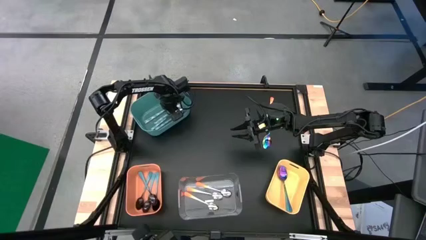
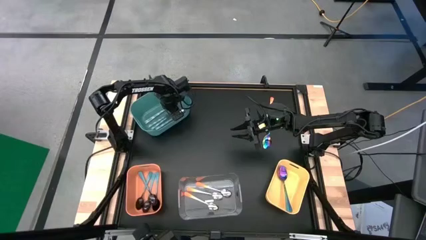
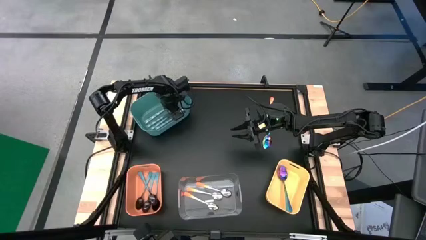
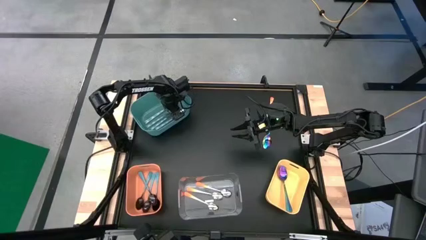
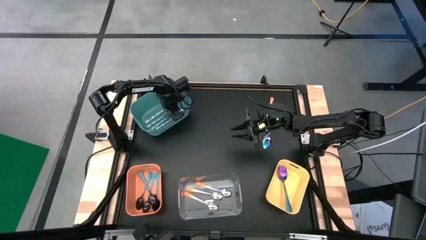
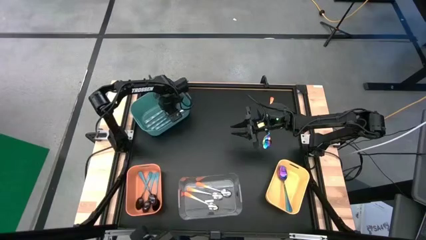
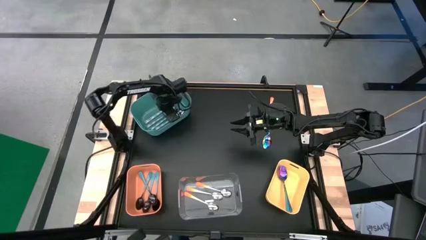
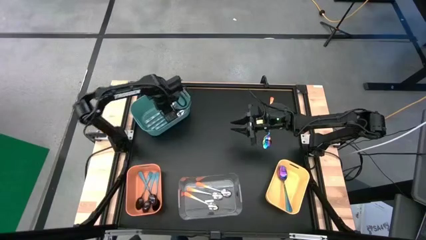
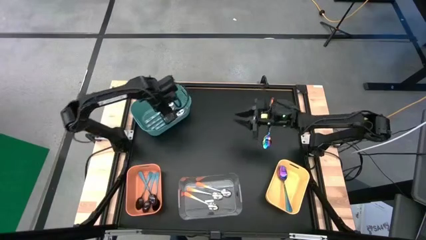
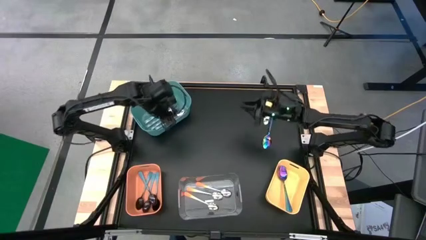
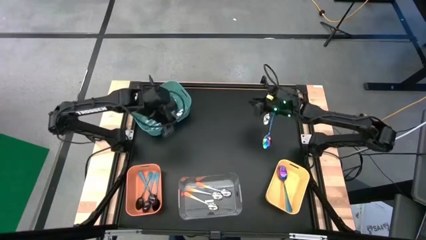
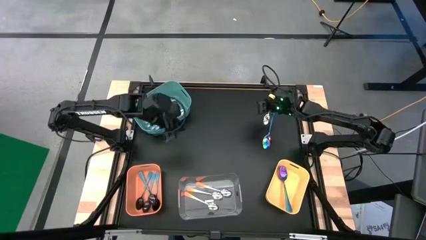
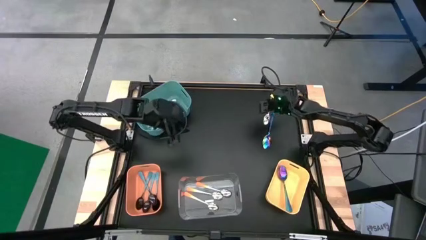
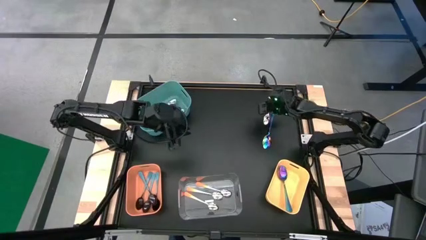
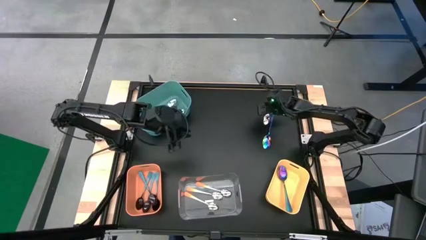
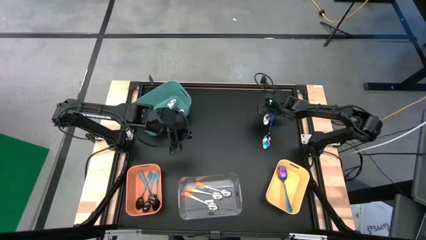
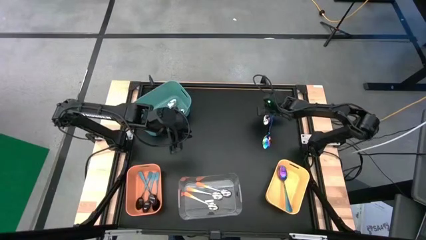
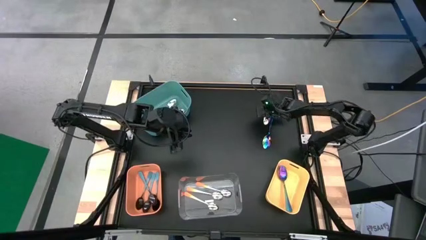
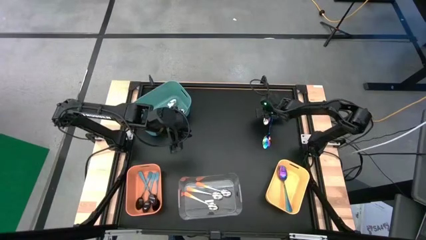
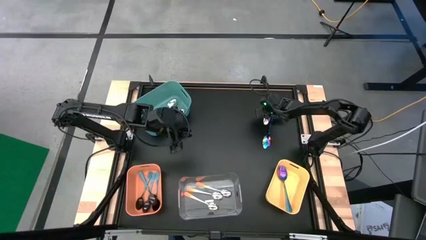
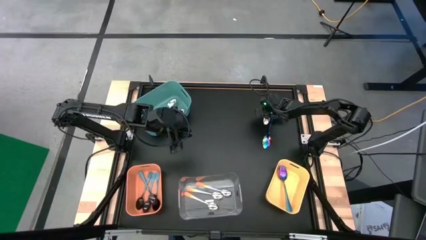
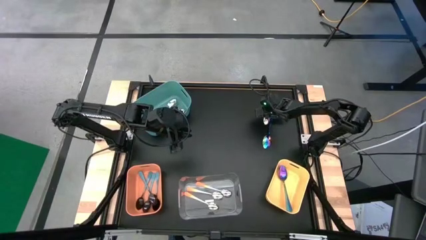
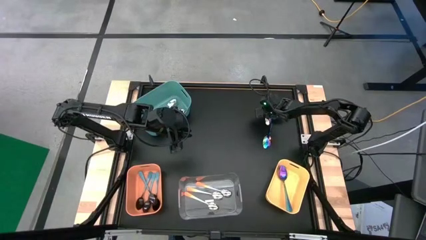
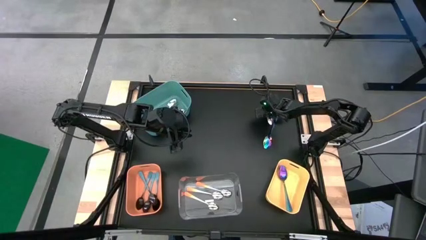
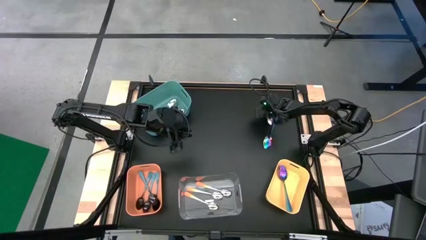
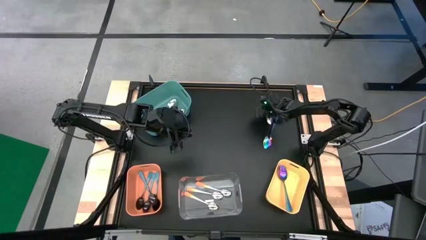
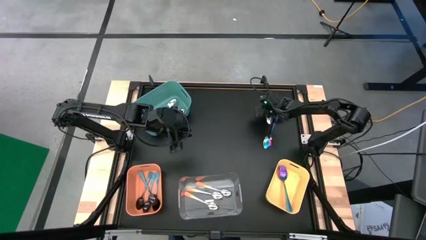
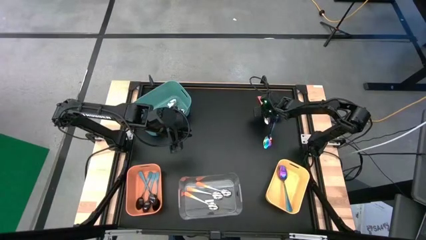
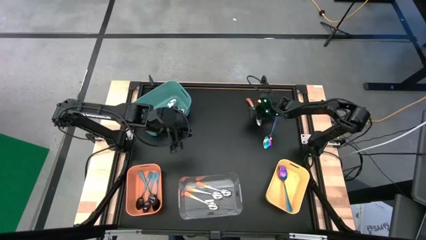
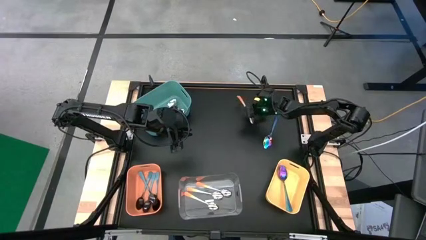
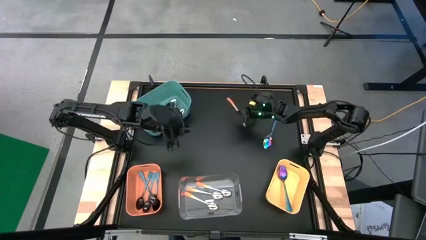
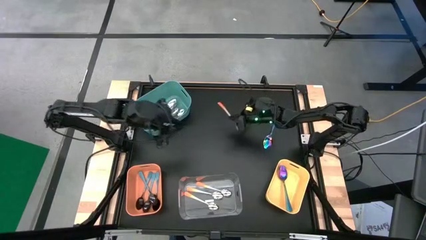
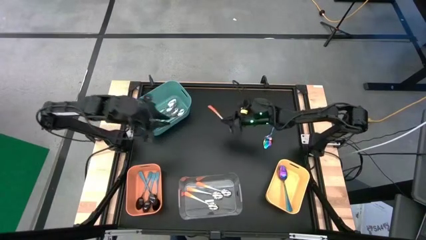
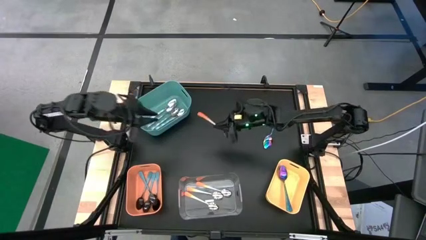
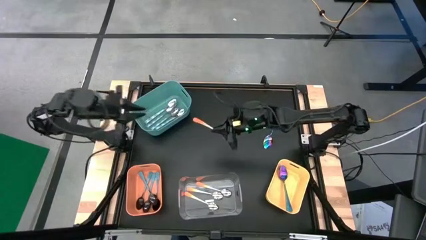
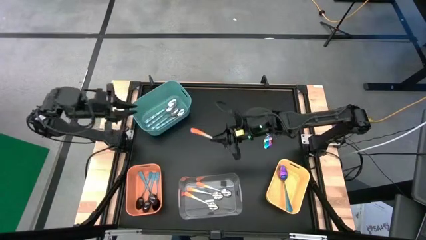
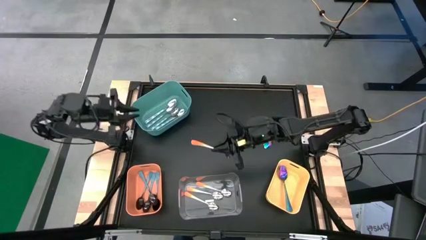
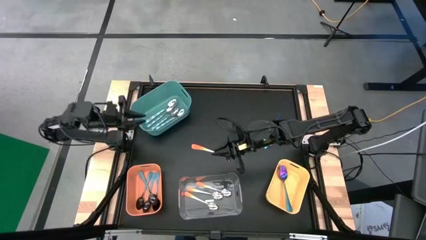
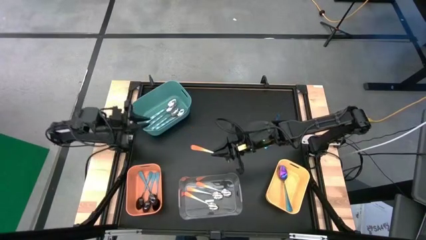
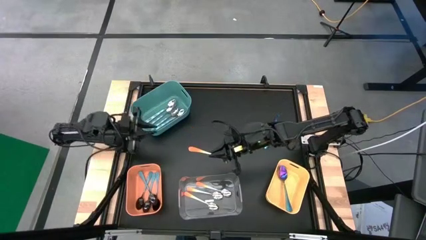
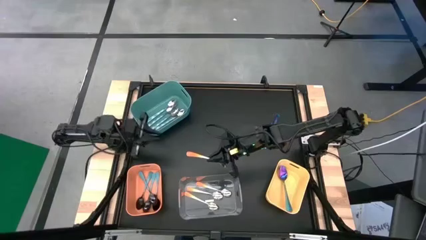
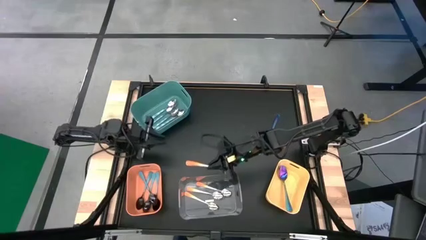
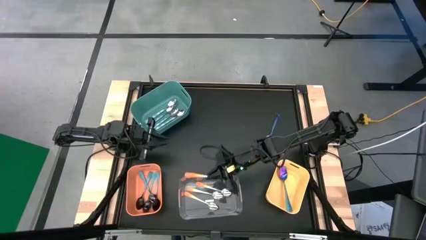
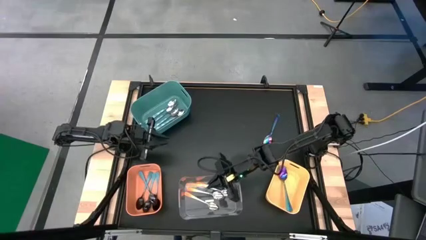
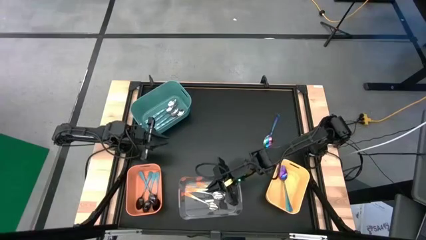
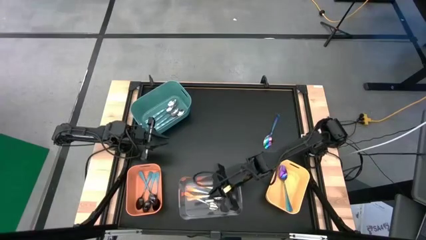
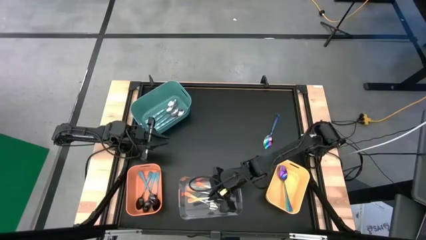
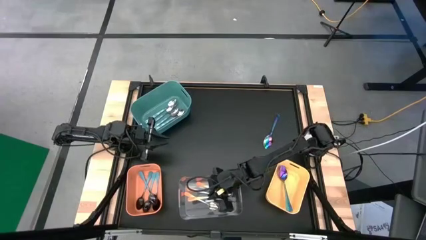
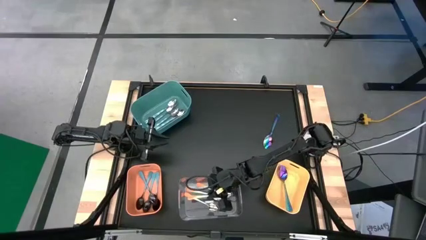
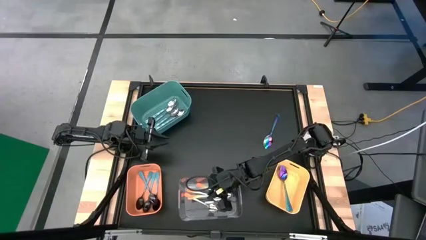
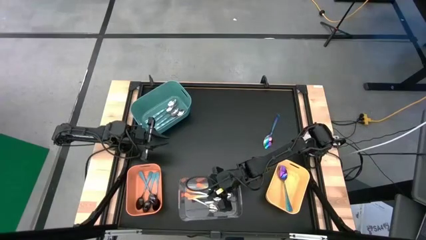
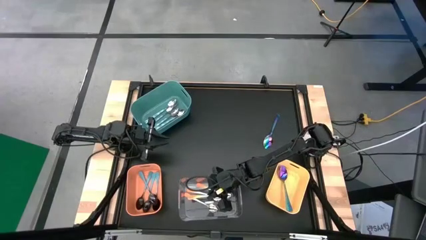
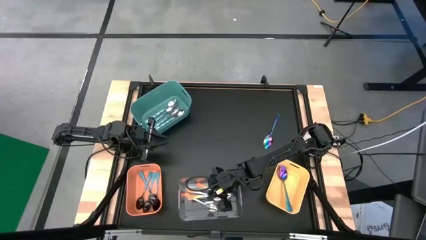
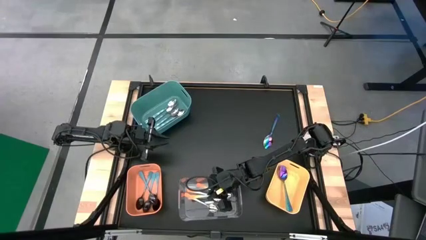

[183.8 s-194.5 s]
Task: Sort silverware by color (type)
Put the orange spoon into the transparent bin

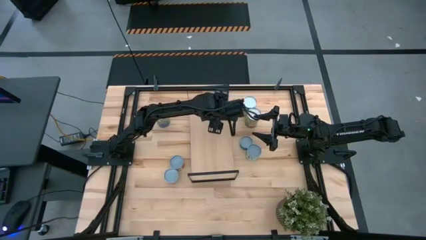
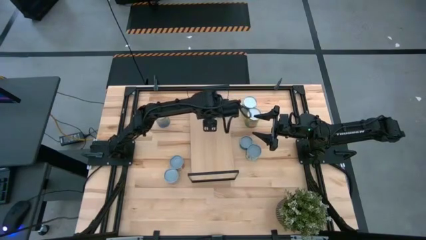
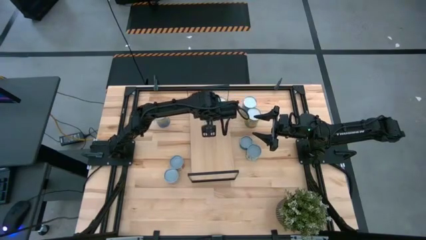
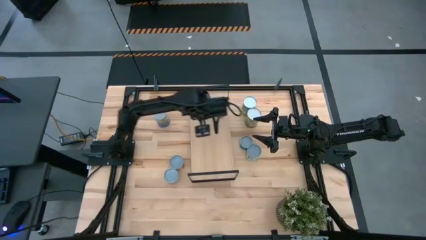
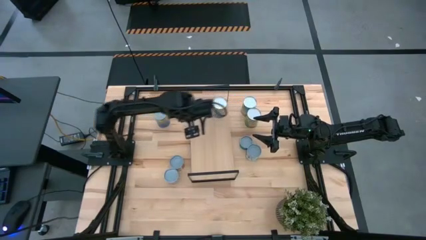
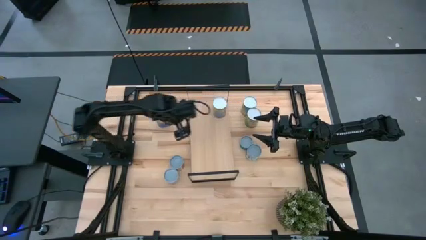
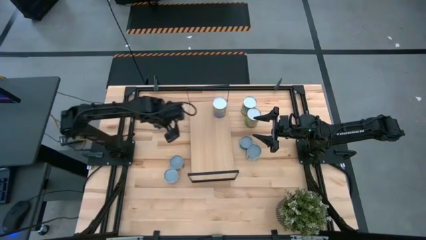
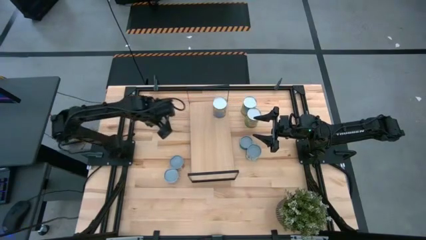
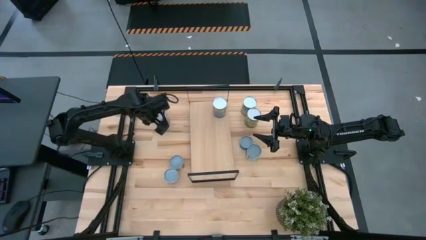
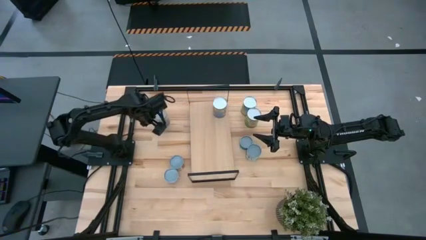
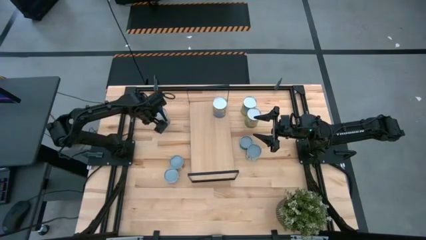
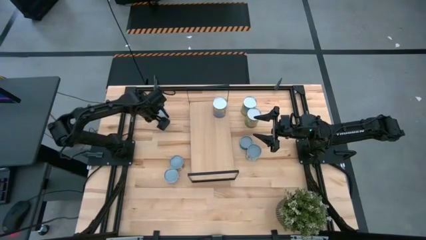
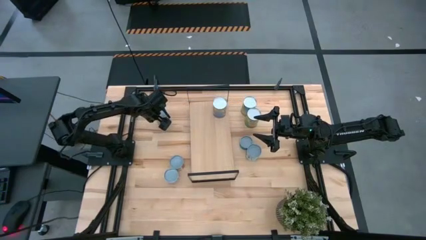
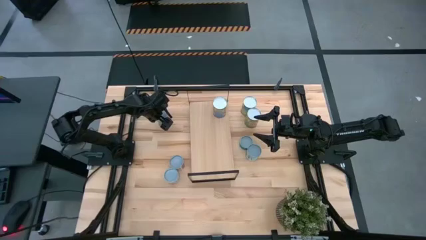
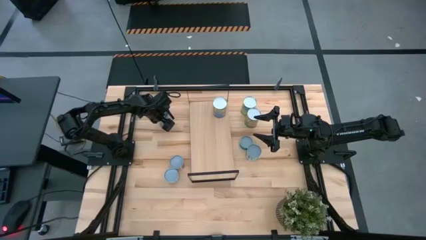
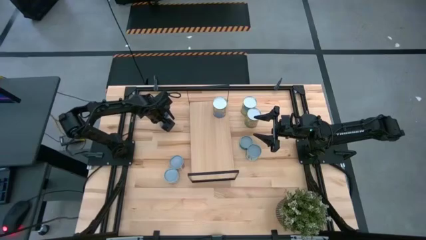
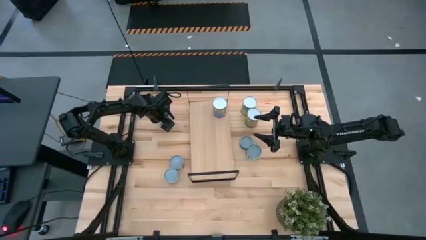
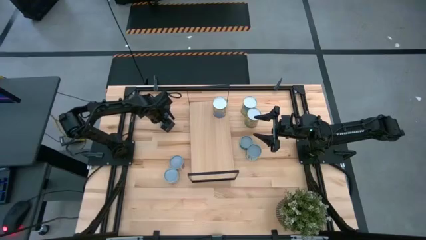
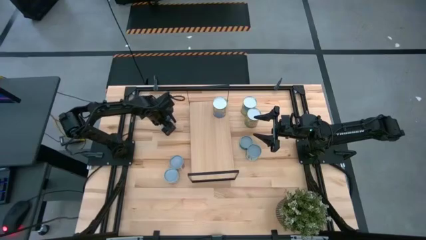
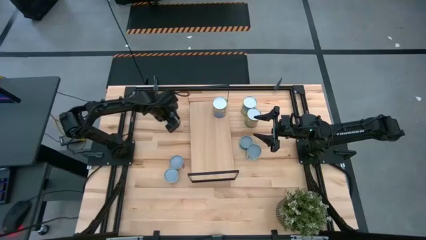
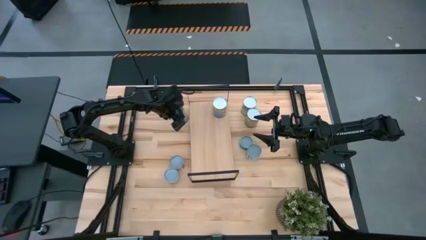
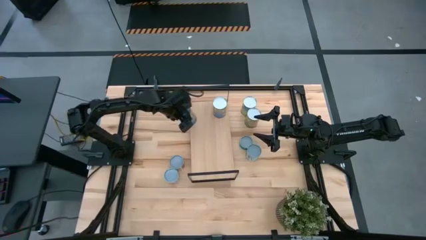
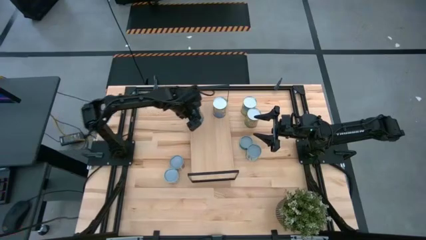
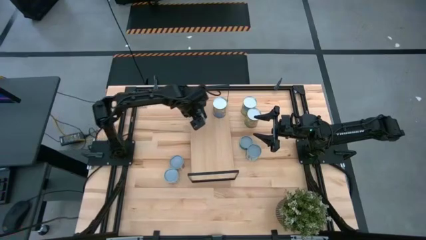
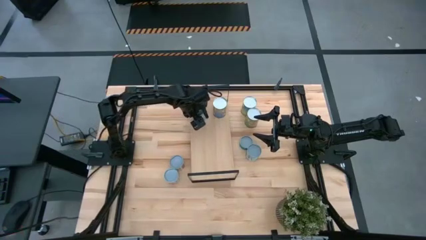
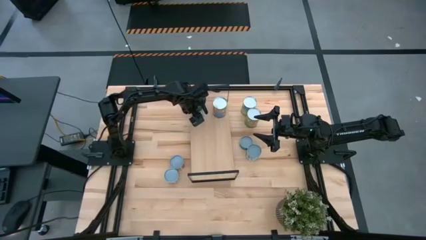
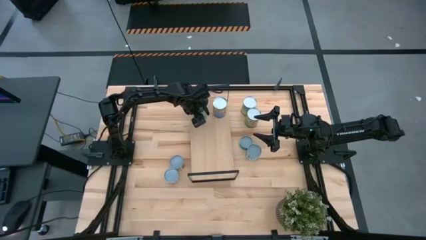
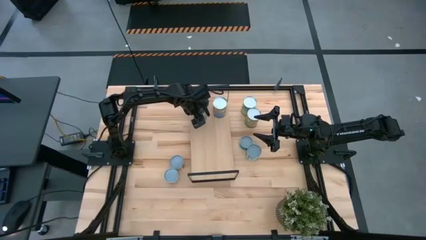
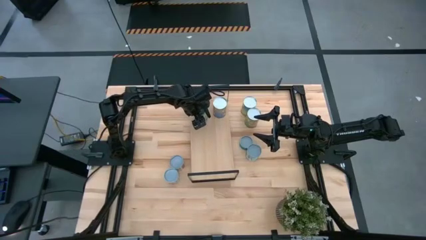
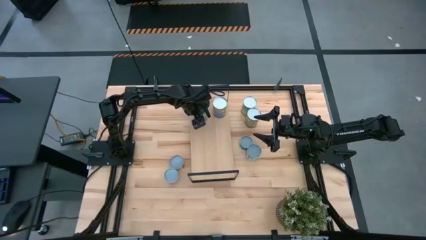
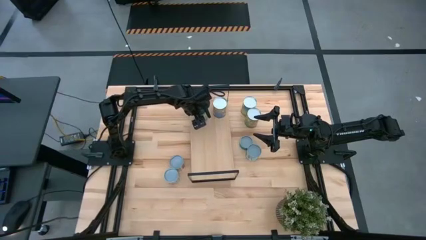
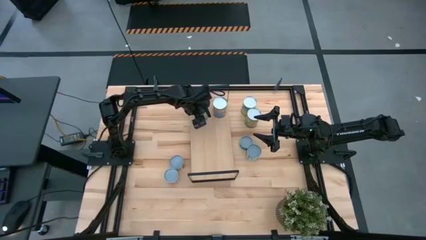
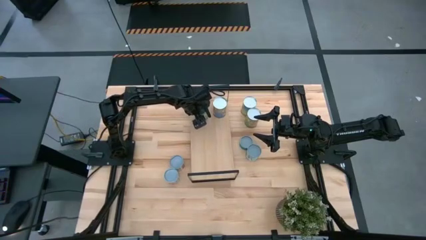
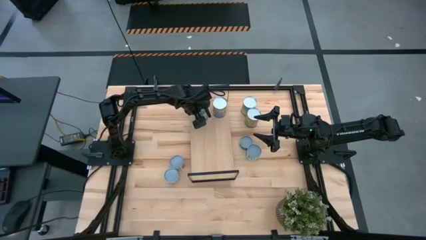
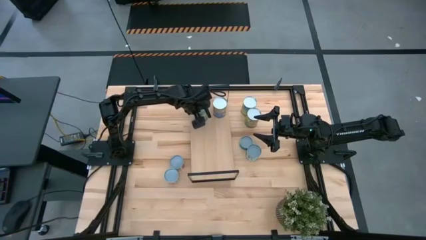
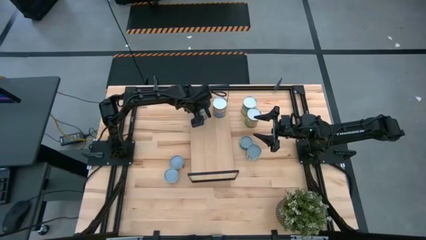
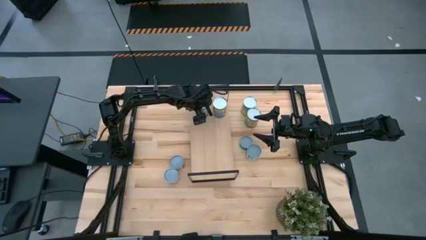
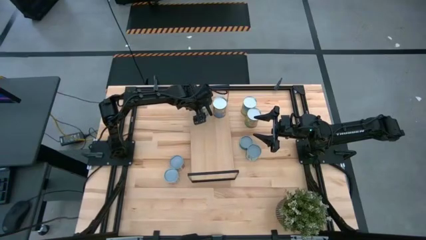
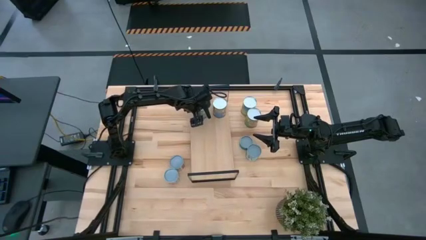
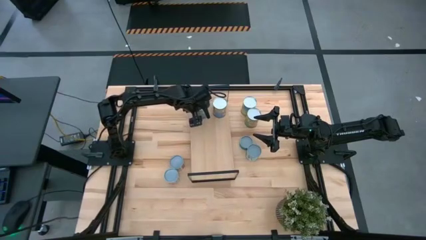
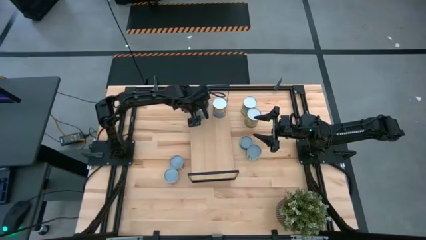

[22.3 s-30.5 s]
Task: Pick and place cans onto a shelf
Put the canned peas on the shelf
